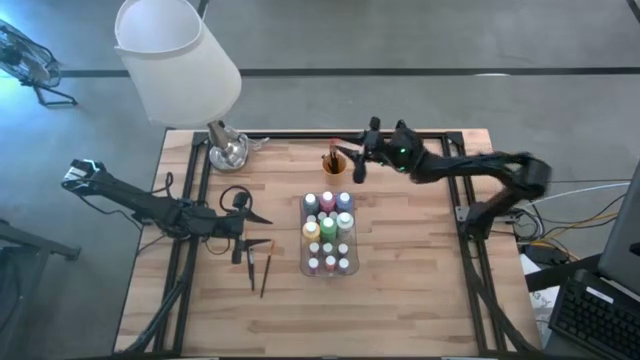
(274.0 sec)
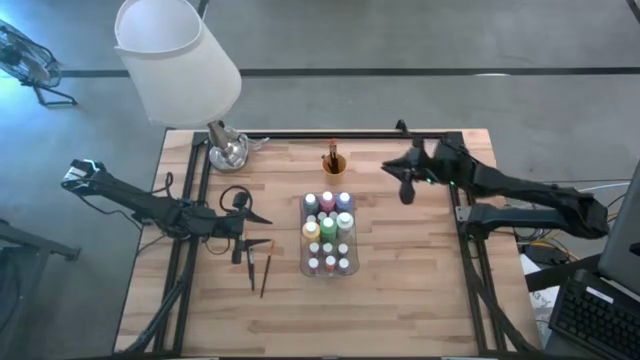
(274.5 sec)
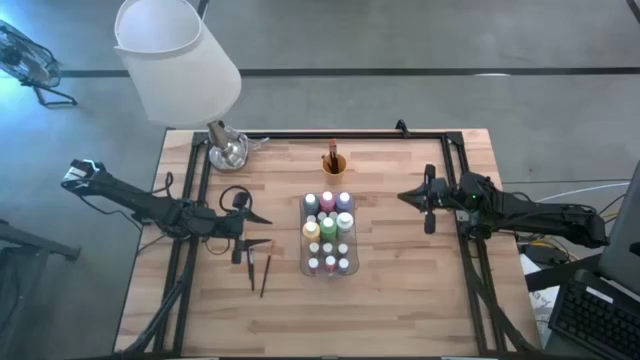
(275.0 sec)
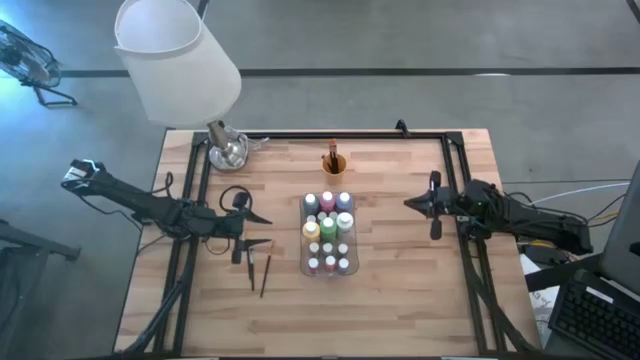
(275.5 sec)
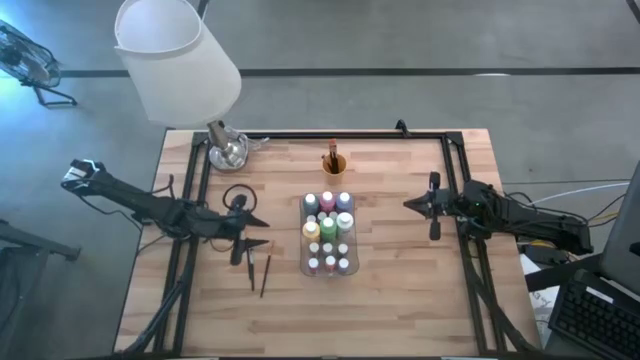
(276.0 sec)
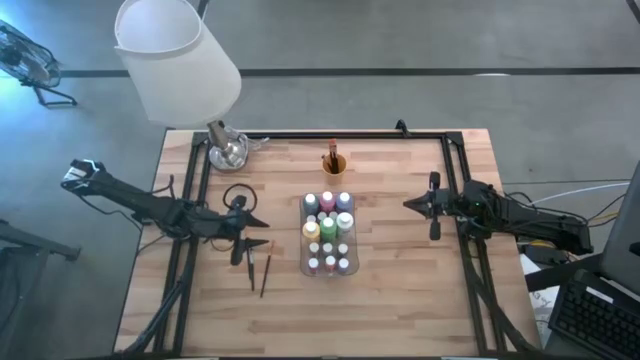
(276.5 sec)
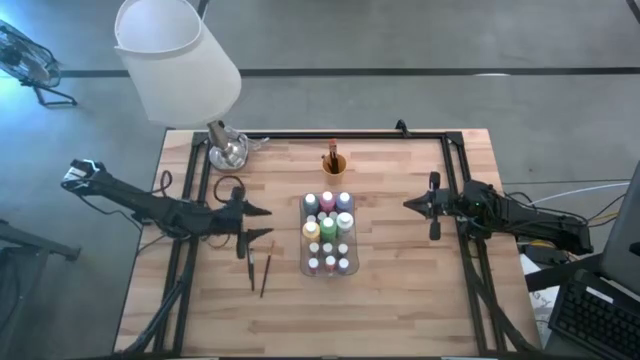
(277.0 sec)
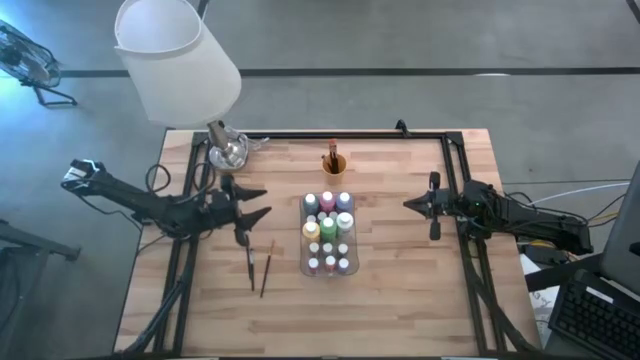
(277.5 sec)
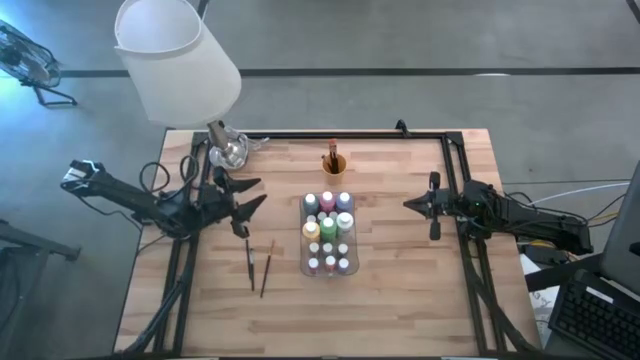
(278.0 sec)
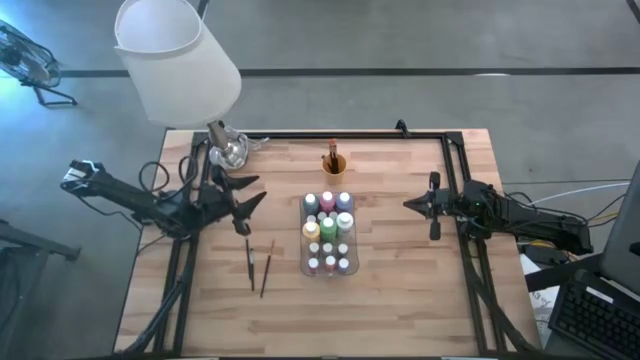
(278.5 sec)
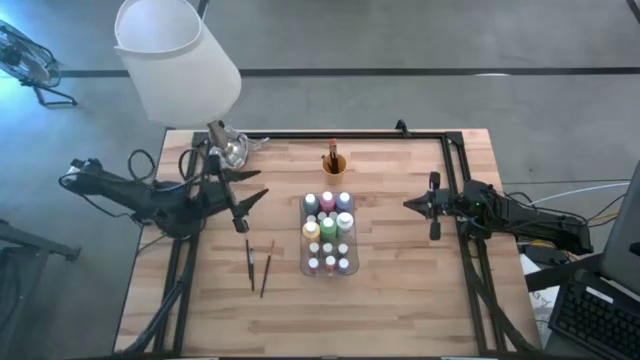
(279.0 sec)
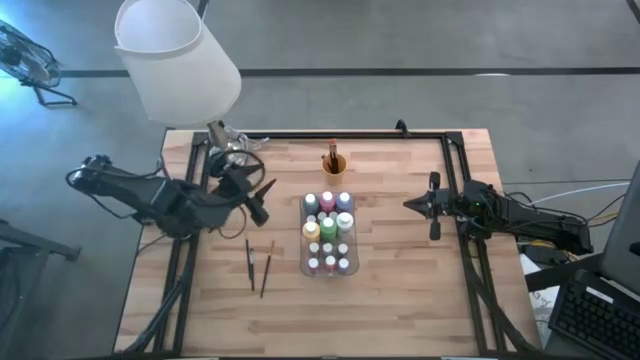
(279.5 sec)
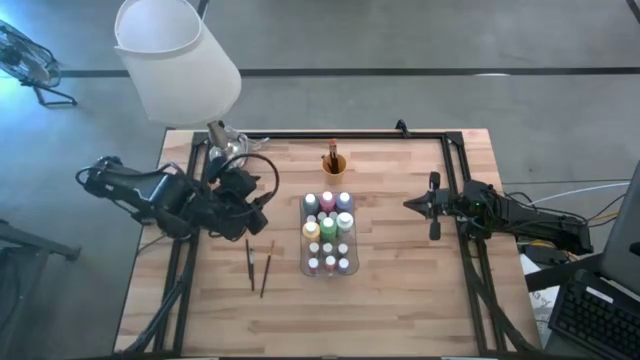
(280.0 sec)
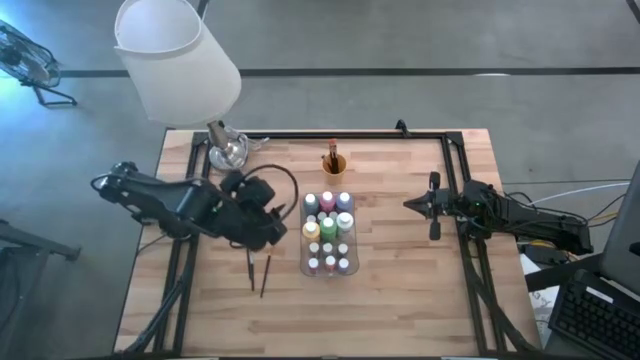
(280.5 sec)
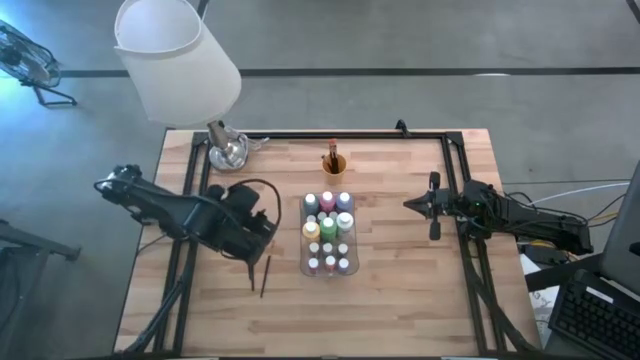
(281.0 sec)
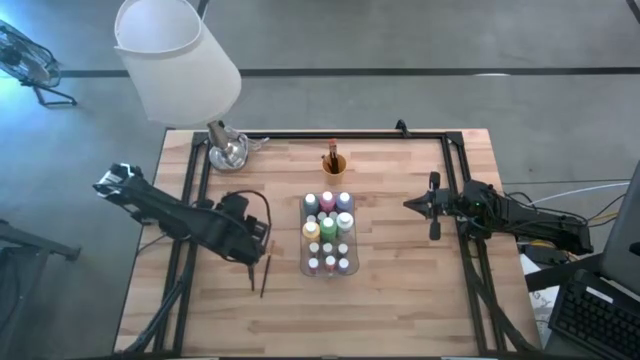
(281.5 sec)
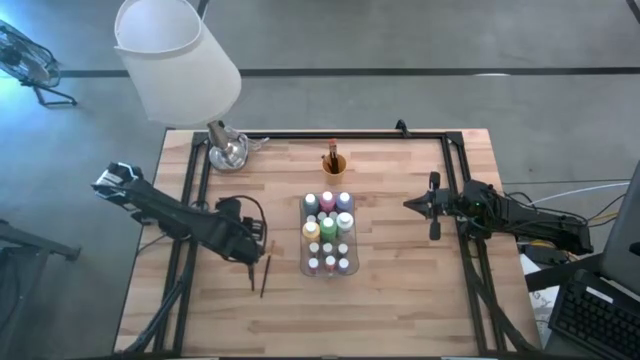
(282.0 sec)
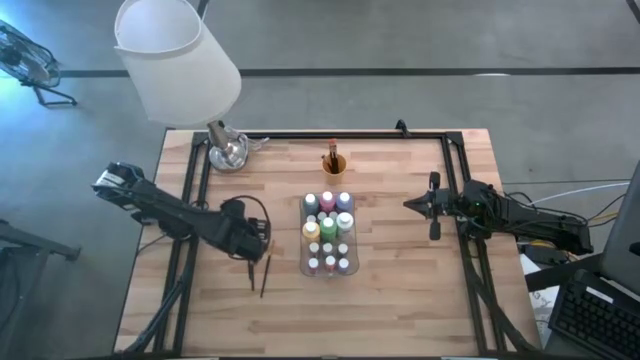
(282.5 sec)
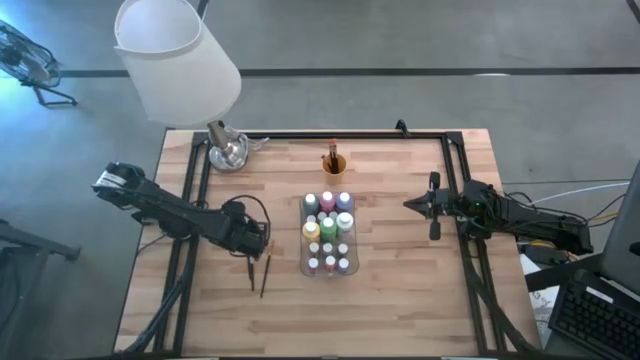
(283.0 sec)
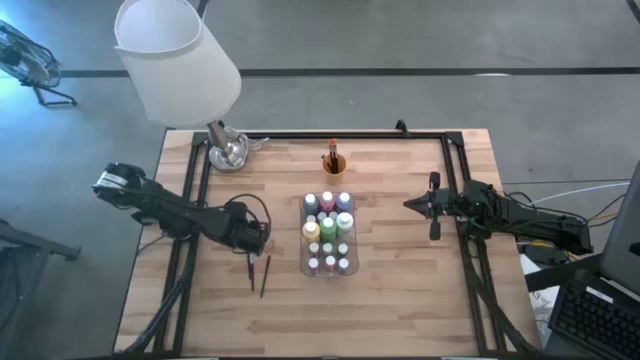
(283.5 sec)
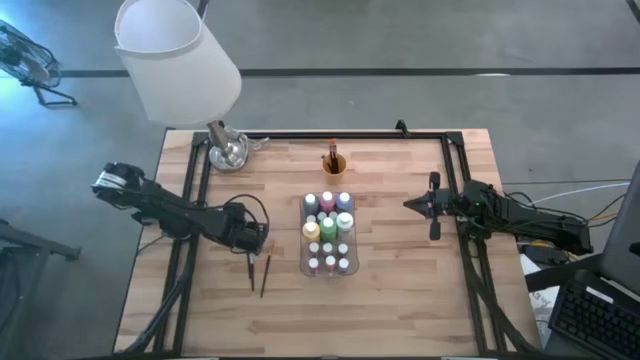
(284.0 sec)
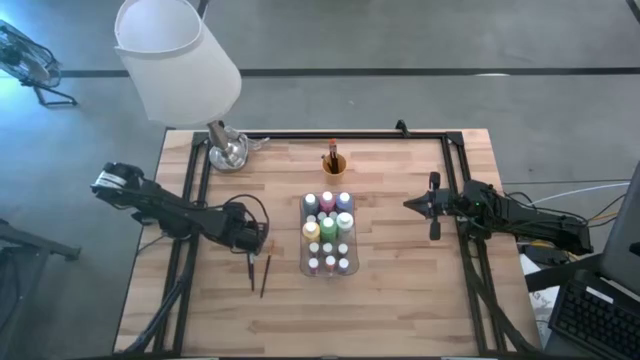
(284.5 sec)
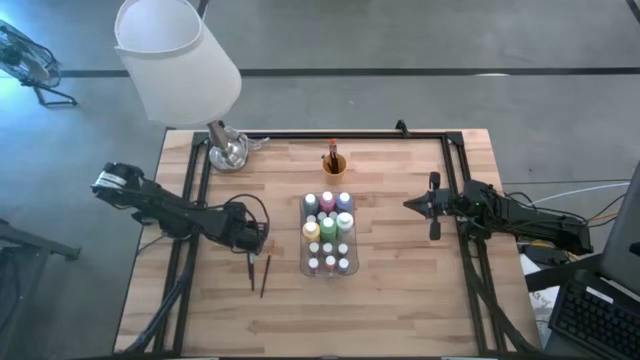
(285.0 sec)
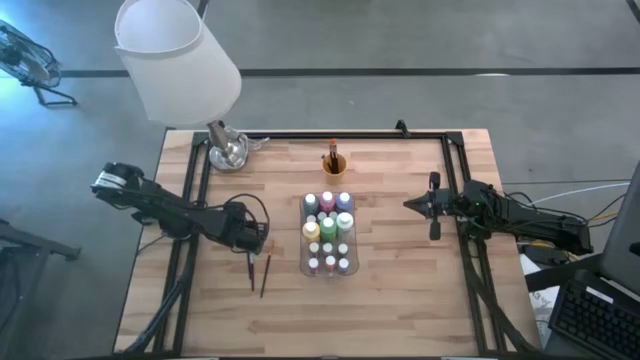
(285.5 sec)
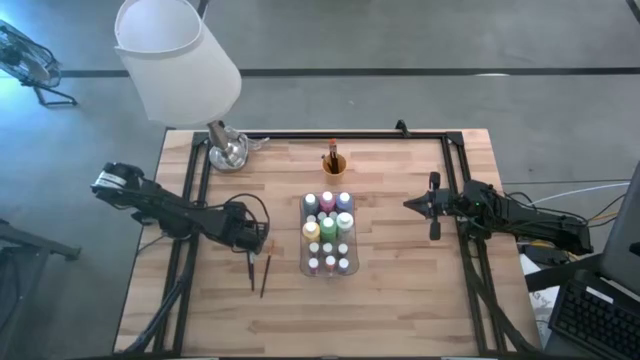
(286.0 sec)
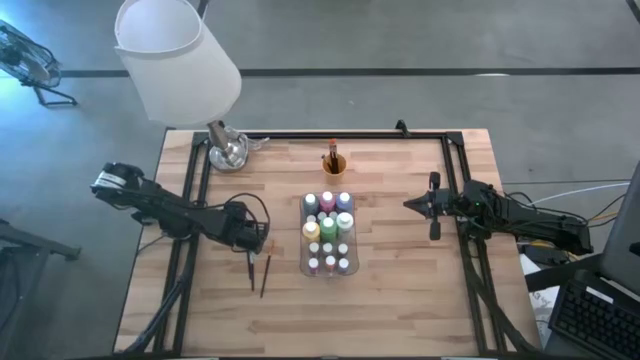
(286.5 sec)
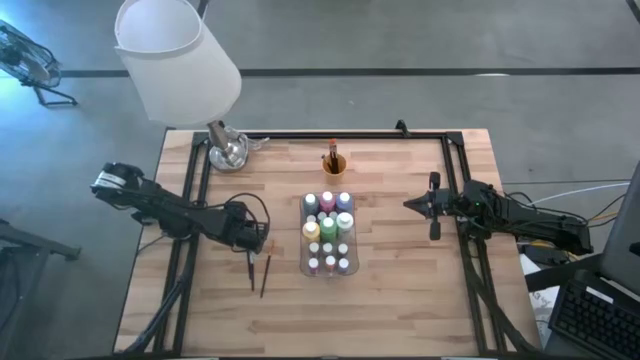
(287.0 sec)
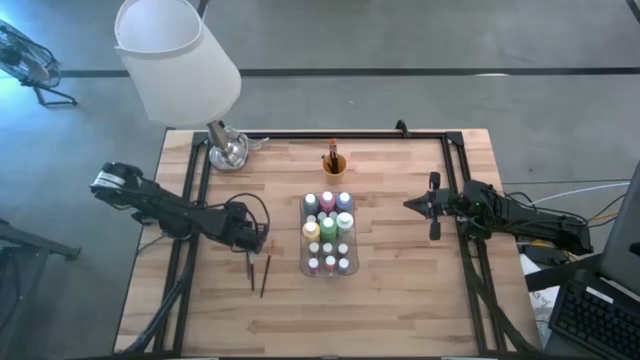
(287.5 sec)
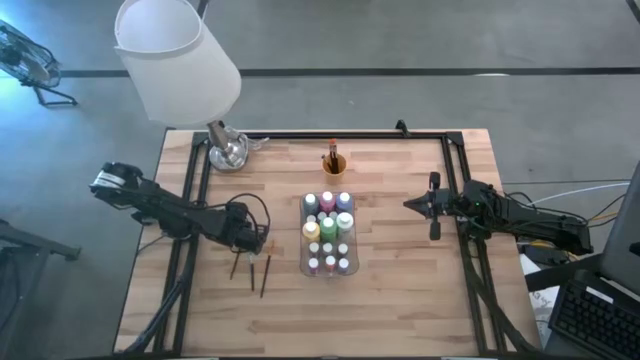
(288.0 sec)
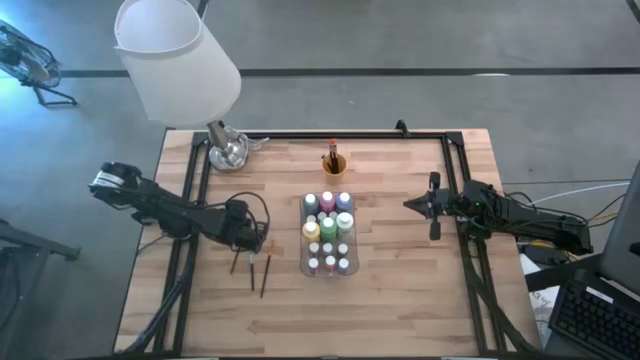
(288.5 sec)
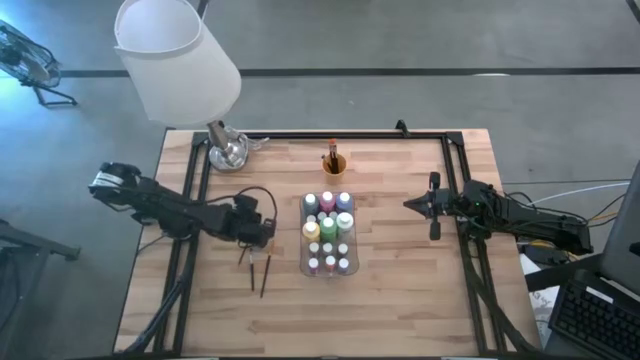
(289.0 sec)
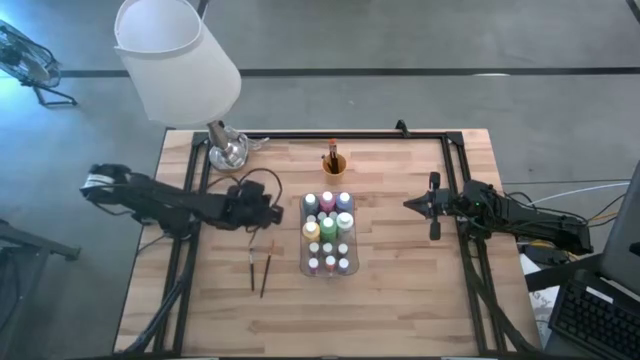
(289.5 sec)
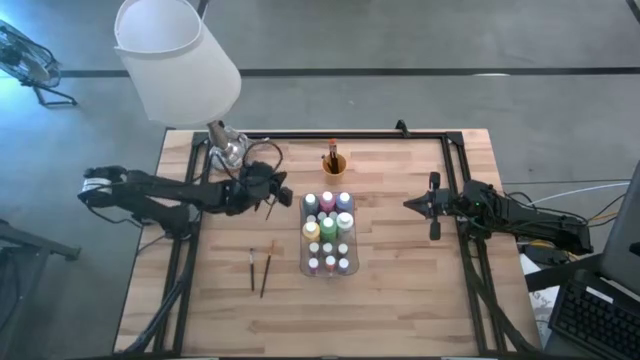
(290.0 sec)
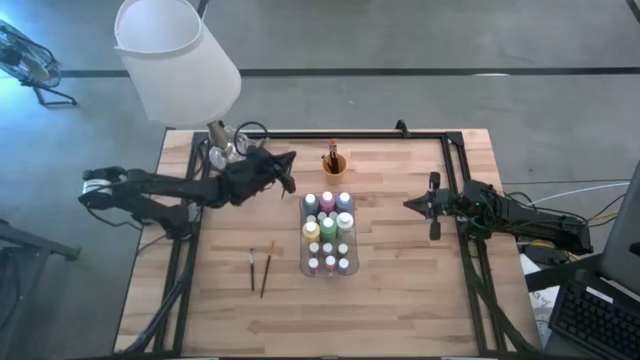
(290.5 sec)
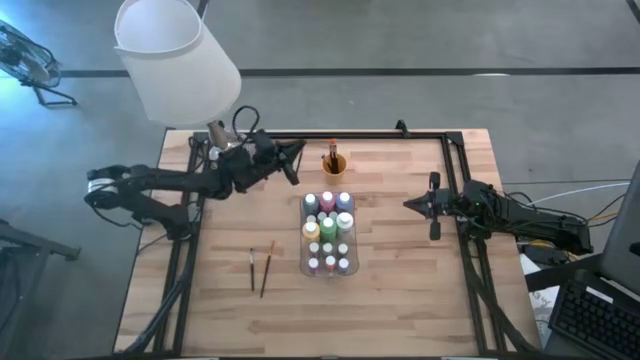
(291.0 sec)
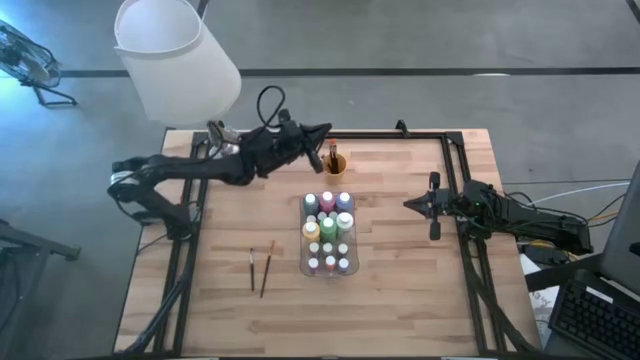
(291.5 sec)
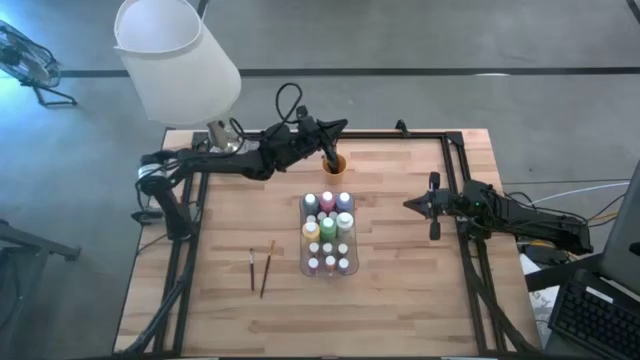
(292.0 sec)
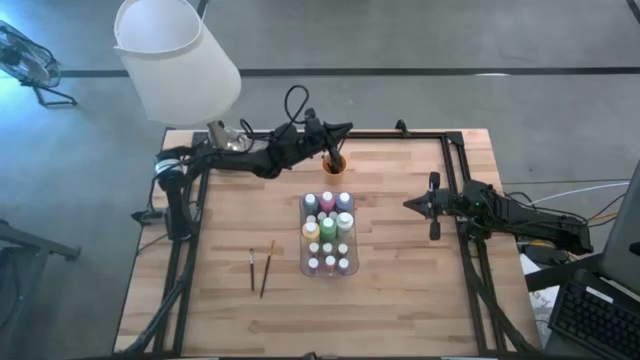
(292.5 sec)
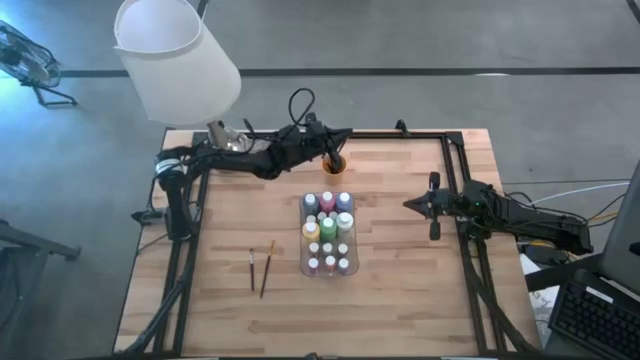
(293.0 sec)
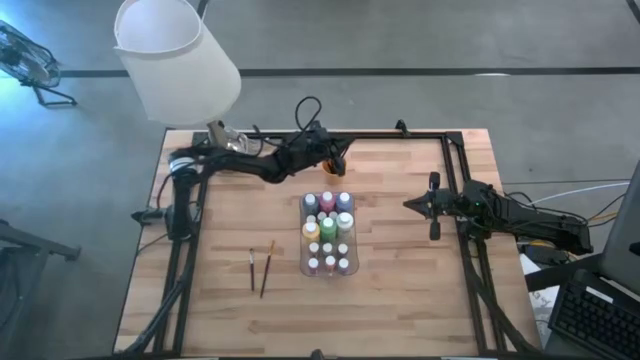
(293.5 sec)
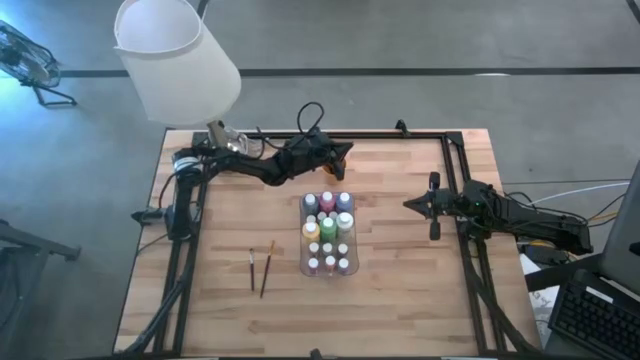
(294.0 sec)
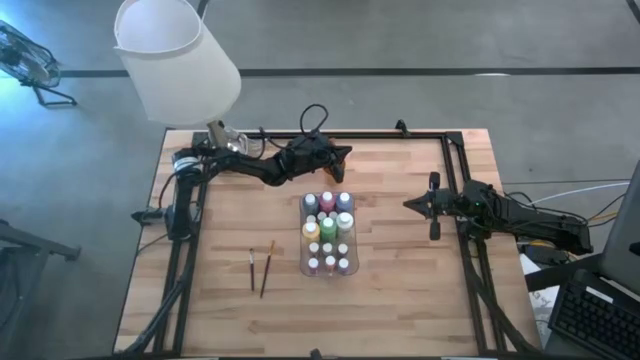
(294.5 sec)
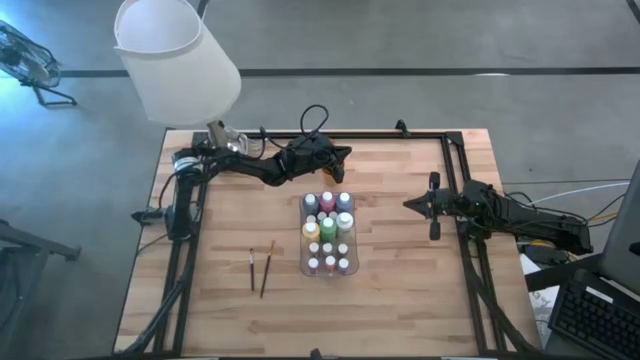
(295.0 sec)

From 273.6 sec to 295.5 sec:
Task: Pick & Place Paint Supplies
Put the orange paintbrush into the yellow cup
